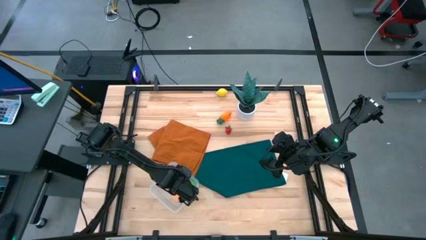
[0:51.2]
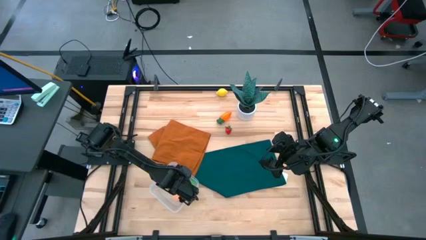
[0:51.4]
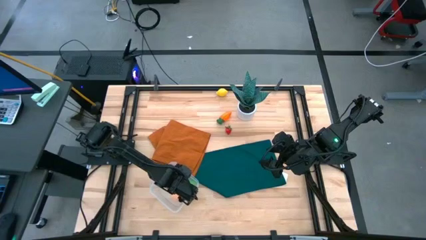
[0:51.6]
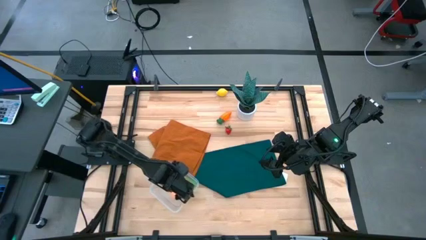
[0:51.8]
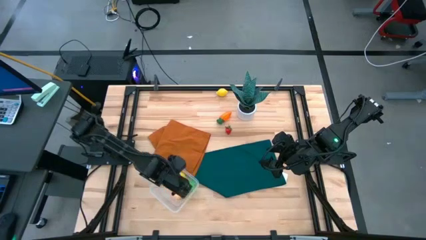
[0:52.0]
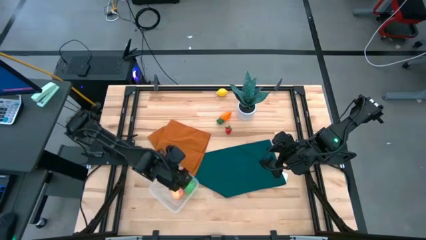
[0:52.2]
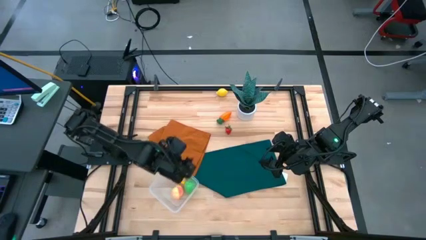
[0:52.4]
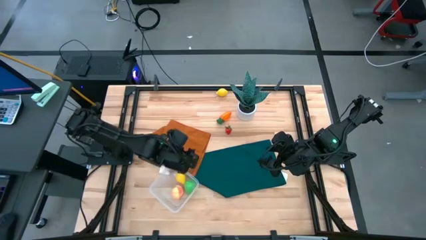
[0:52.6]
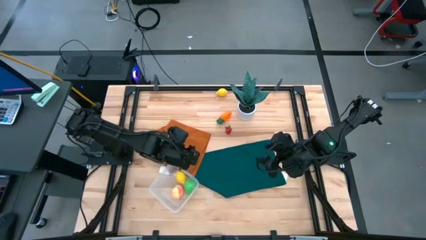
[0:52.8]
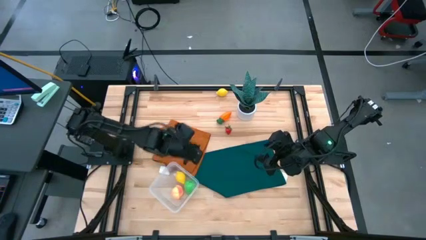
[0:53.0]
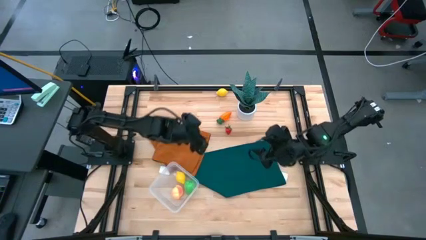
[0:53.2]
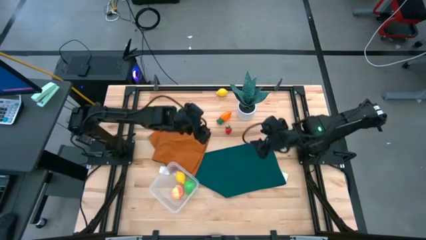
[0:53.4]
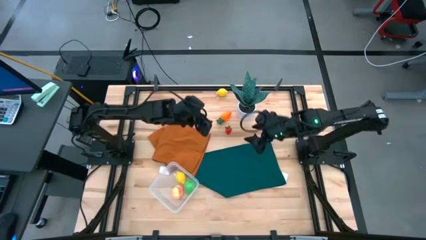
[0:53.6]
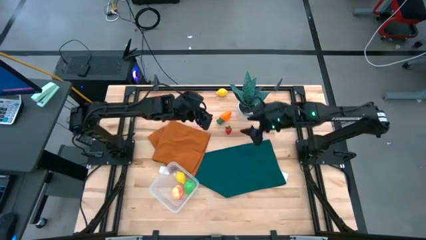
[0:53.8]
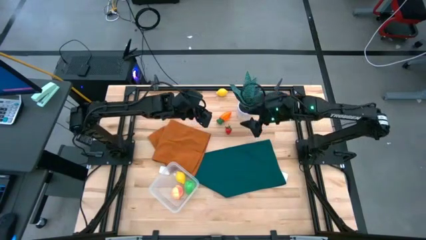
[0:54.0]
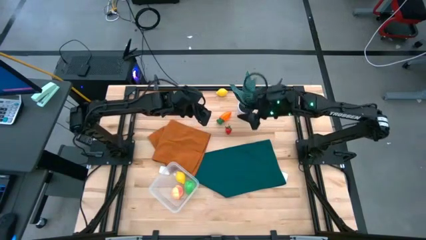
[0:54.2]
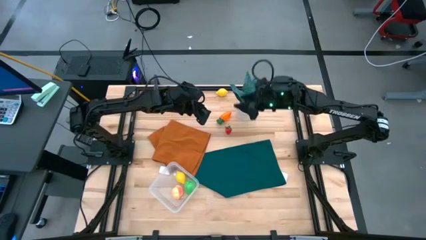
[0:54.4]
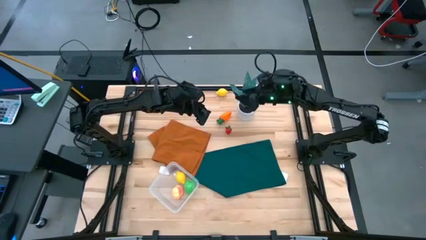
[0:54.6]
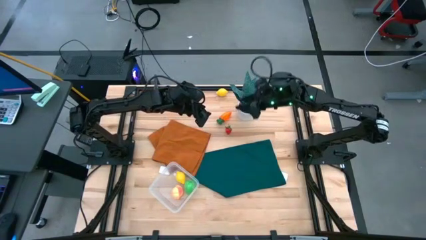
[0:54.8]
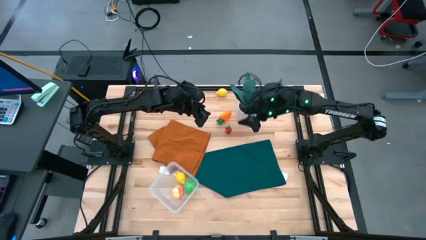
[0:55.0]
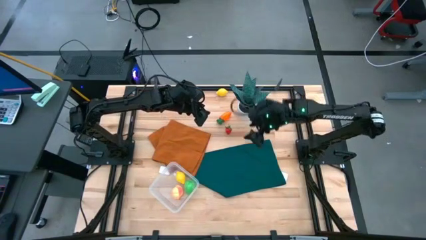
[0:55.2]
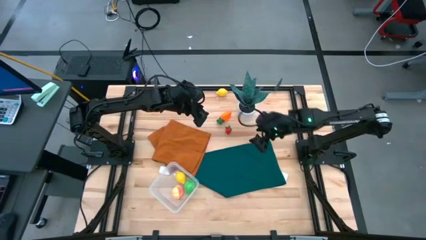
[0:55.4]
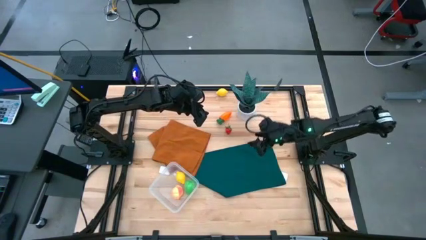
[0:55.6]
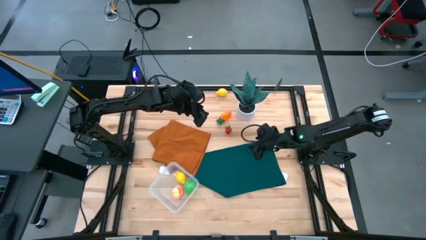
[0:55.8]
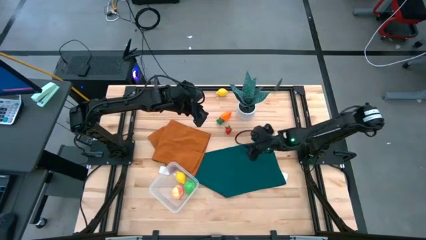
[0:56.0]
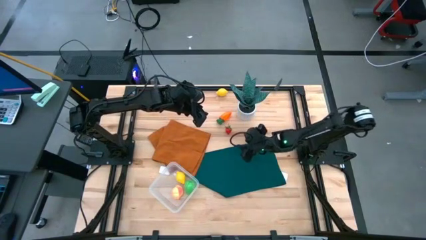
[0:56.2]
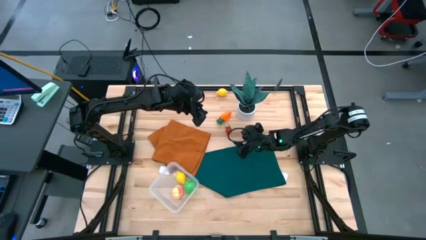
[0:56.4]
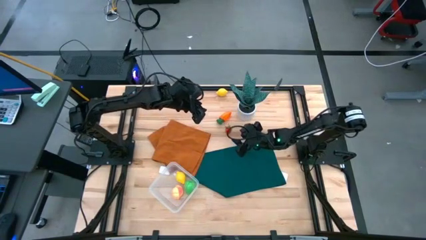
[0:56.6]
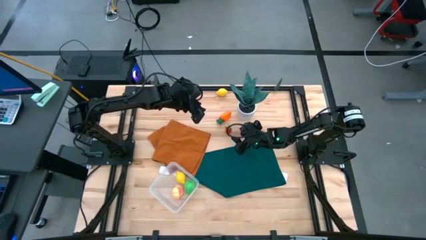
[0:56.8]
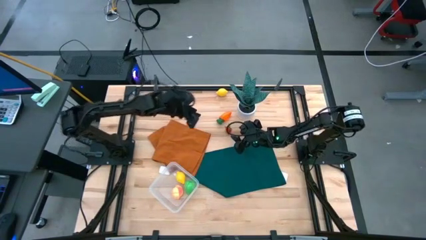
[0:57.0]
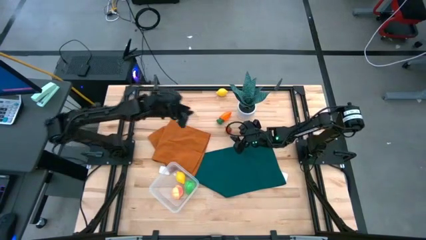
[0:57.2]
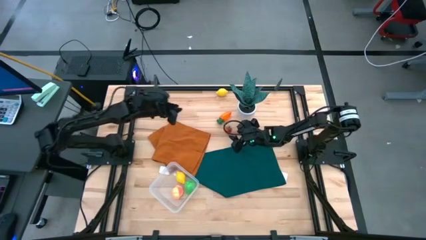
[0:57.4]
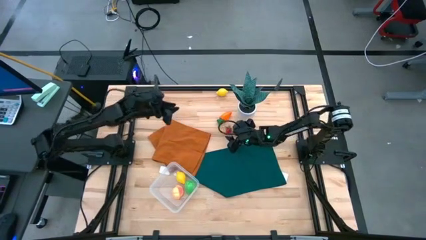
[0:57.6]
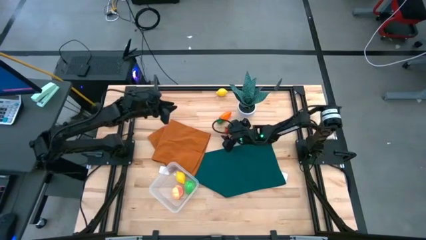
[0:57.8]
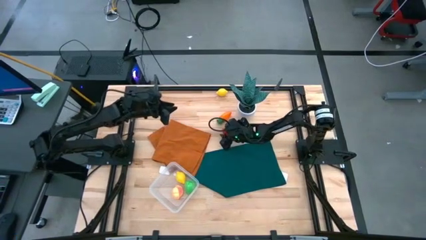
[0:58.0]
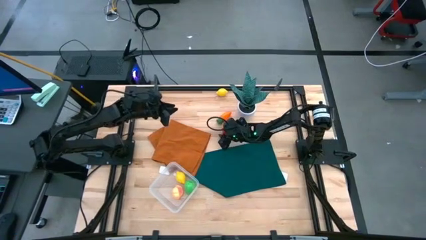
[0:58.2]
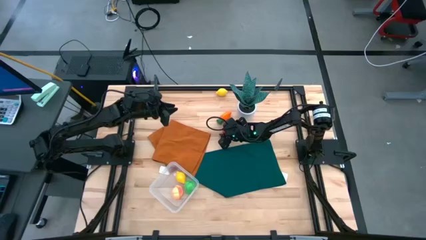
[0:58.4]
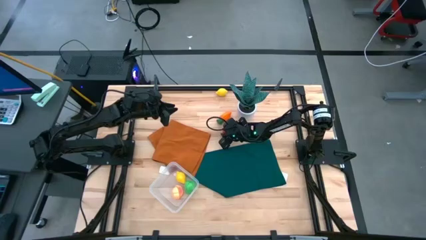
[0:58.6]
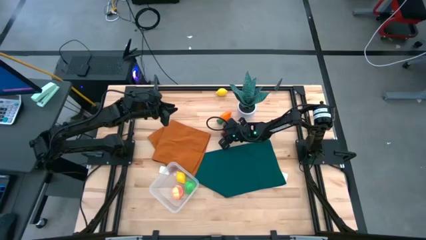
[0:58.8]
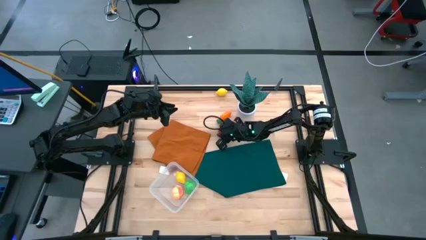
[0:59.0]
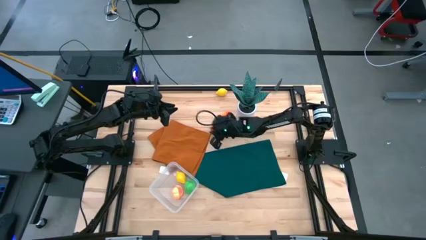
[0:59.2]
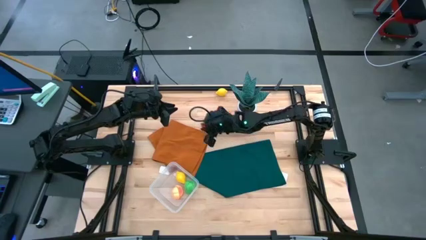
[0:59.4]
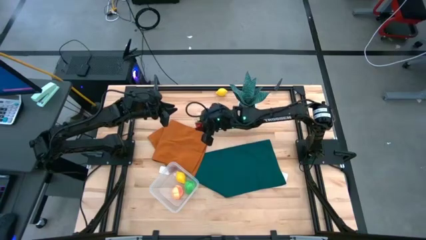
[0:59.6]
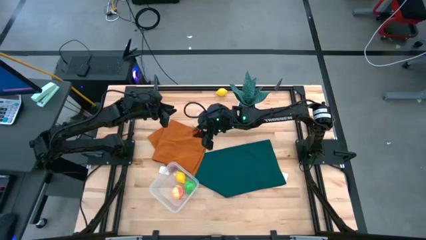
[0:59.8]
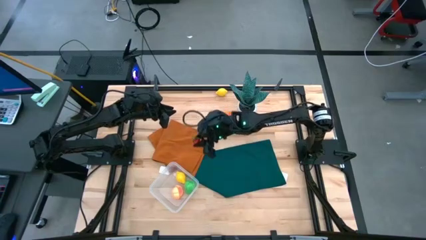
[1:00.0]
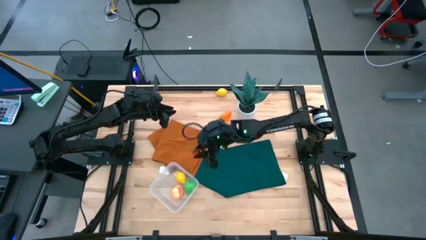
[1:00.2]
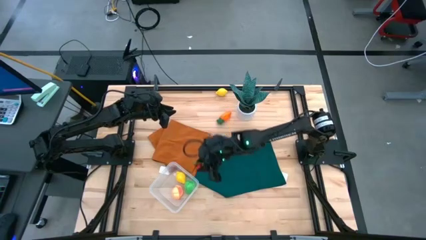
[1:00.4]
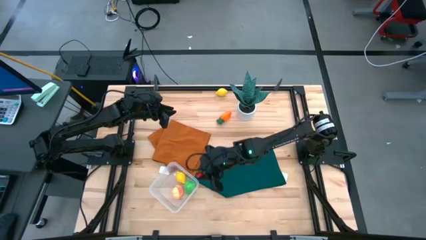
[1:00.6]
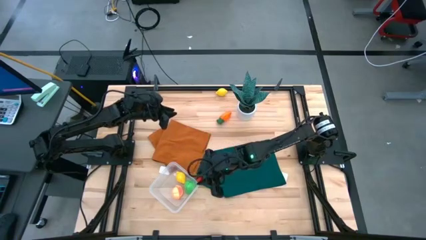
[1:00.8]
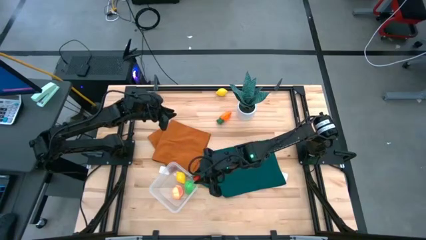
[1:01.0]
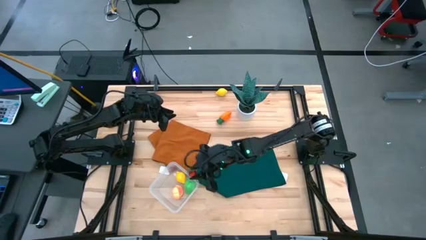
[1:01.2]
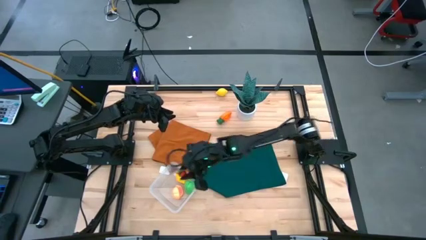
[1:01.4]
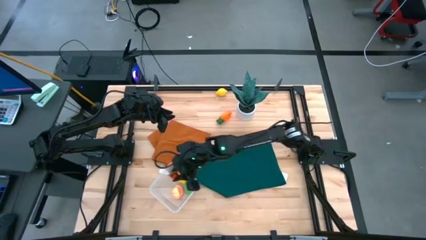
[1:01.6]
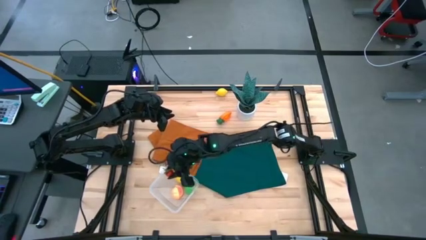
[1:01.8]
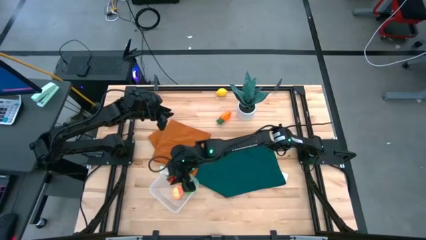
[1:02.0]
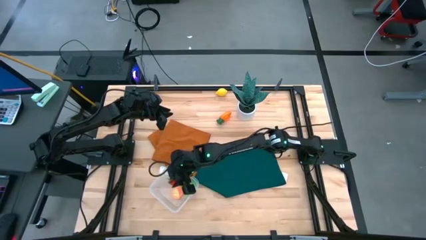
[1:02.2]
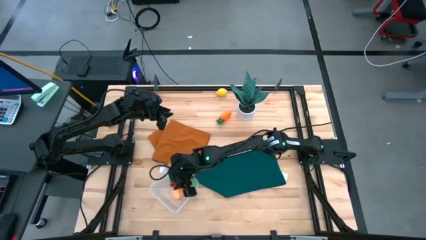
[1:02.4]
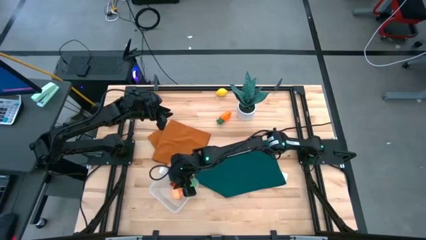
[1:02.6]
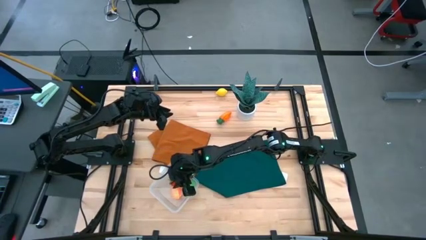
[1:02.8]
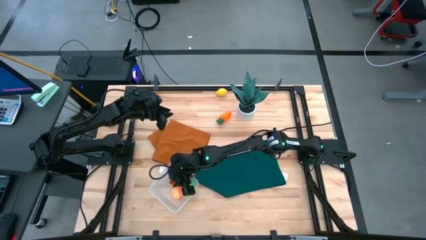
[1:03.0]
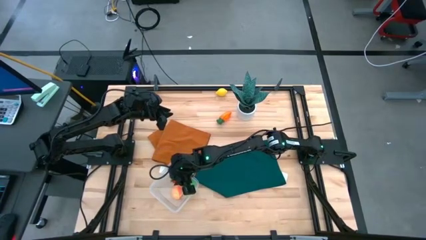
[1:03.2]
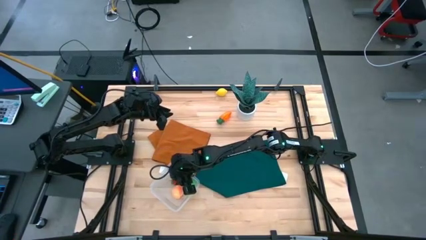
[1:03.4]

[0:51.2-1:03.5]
Task: Pick and placing Produce into tupperware
Put the strawberry into the transparent container
